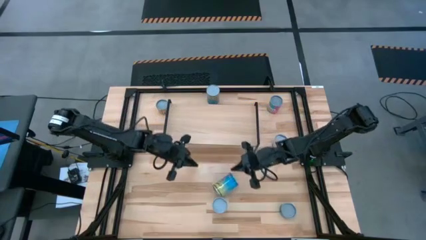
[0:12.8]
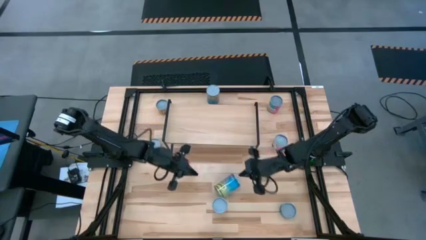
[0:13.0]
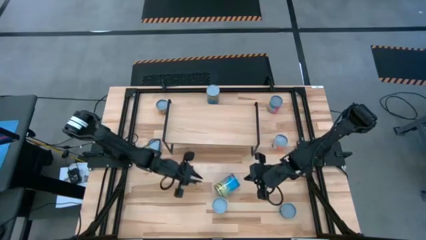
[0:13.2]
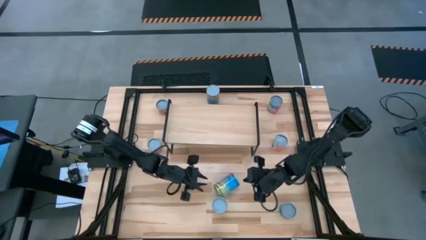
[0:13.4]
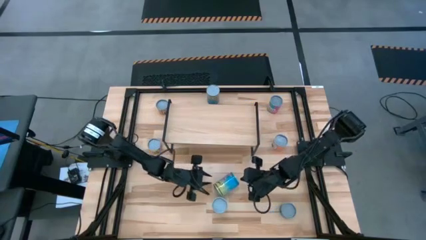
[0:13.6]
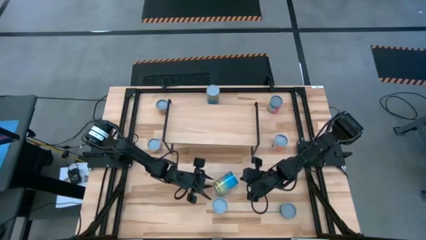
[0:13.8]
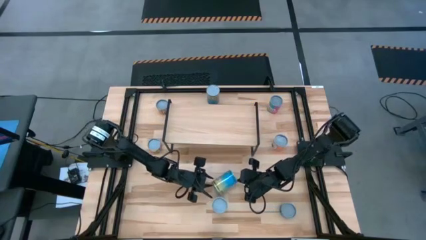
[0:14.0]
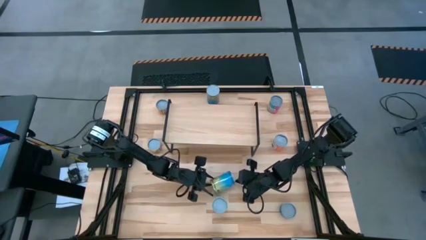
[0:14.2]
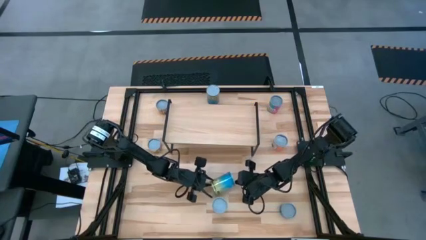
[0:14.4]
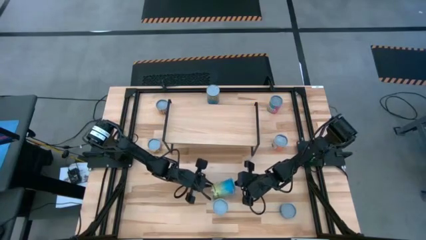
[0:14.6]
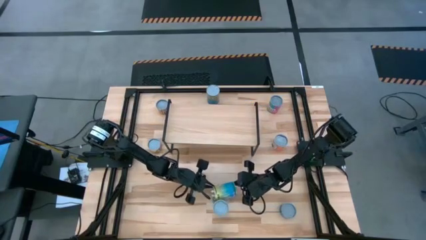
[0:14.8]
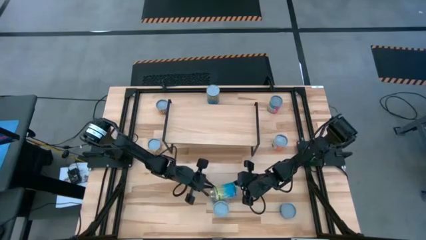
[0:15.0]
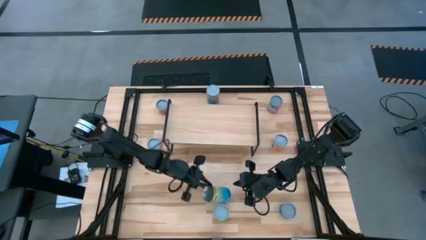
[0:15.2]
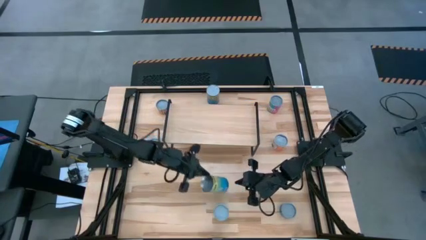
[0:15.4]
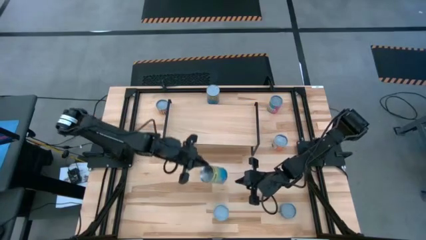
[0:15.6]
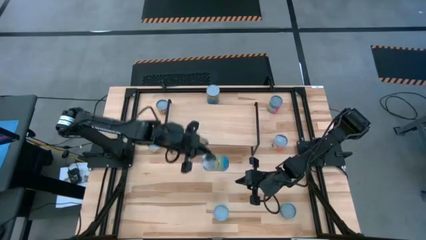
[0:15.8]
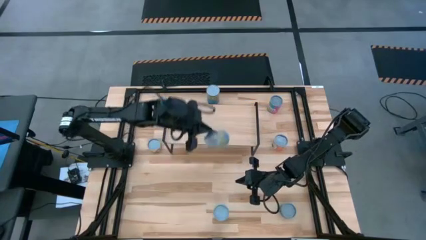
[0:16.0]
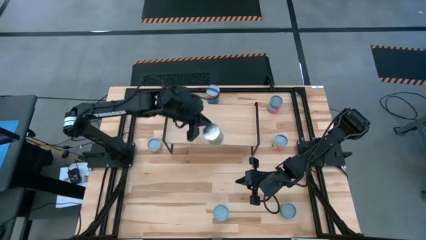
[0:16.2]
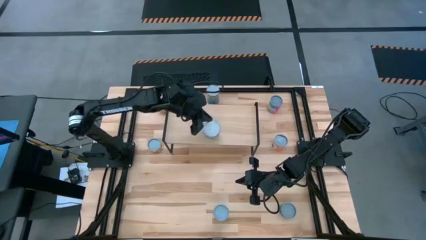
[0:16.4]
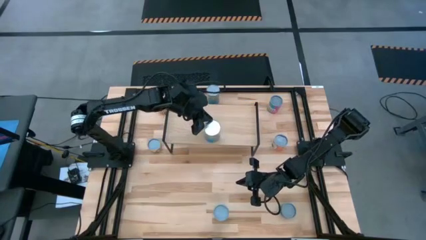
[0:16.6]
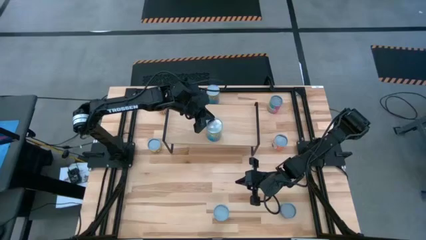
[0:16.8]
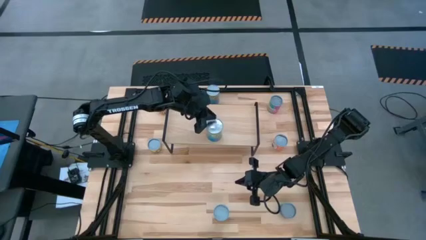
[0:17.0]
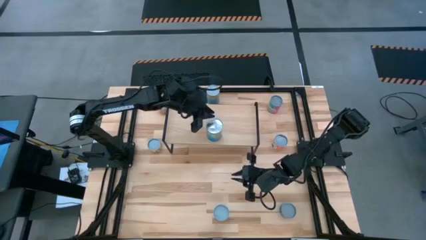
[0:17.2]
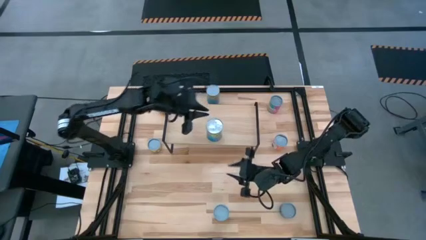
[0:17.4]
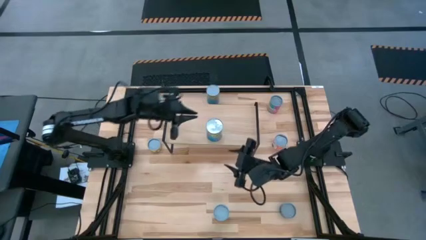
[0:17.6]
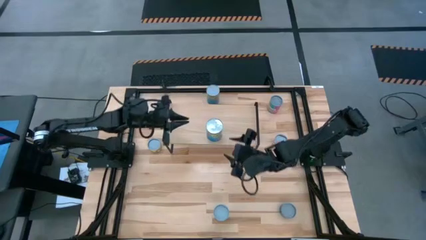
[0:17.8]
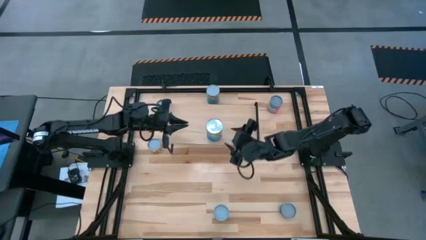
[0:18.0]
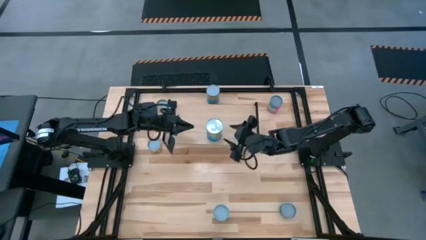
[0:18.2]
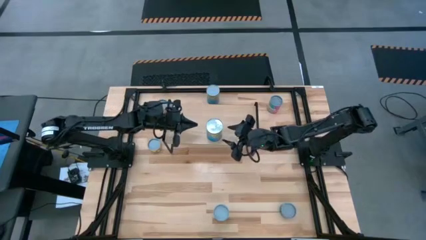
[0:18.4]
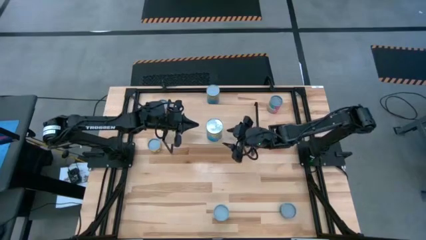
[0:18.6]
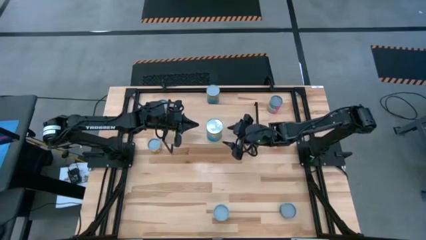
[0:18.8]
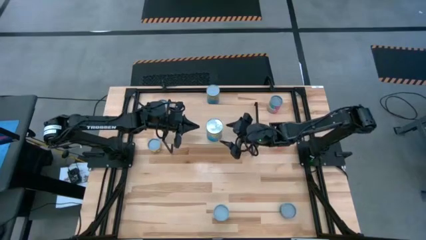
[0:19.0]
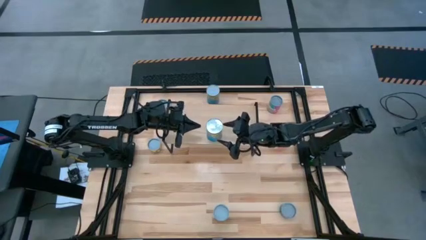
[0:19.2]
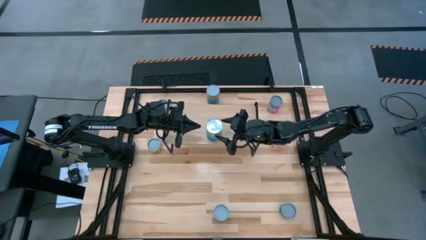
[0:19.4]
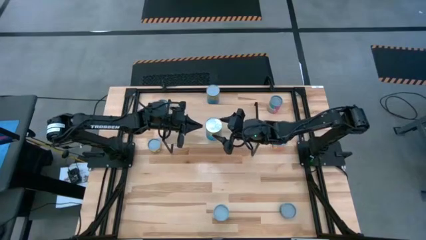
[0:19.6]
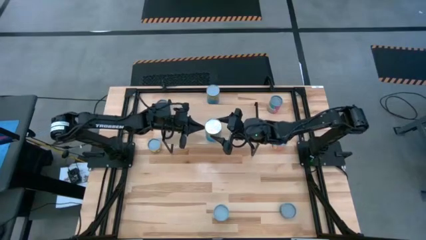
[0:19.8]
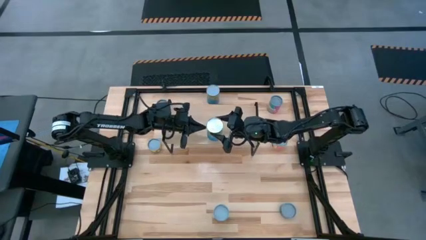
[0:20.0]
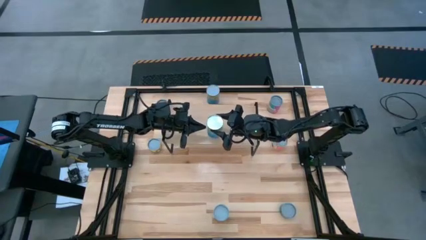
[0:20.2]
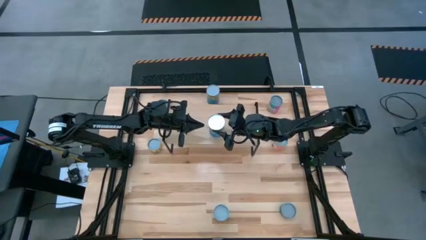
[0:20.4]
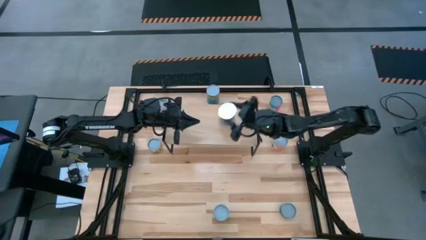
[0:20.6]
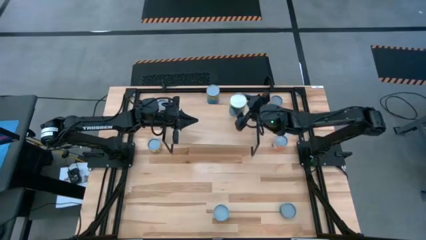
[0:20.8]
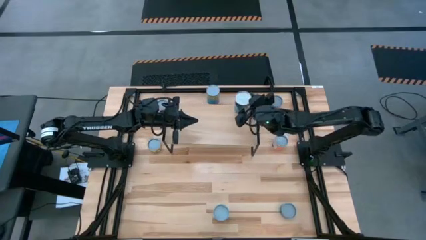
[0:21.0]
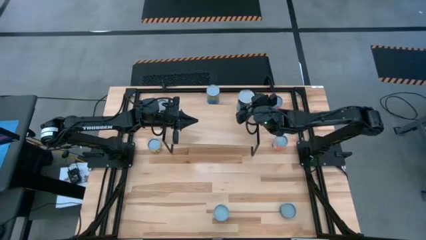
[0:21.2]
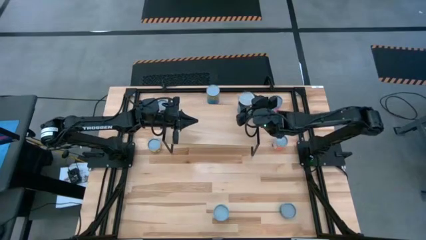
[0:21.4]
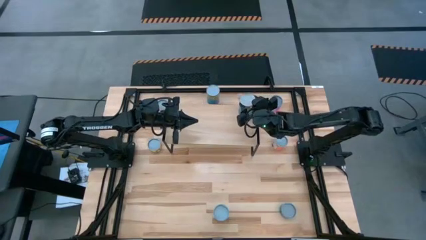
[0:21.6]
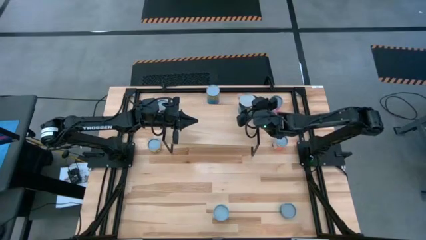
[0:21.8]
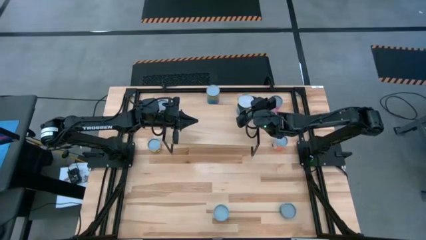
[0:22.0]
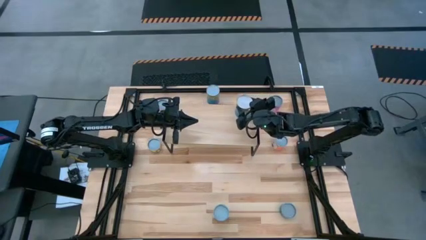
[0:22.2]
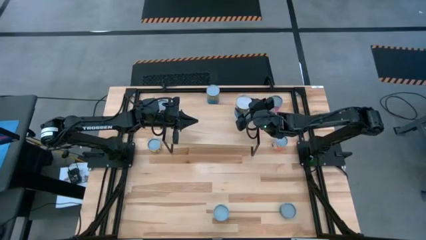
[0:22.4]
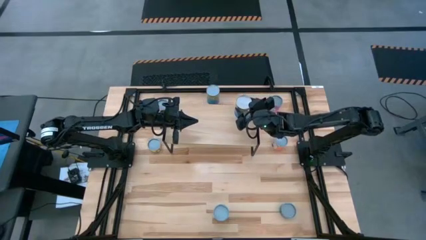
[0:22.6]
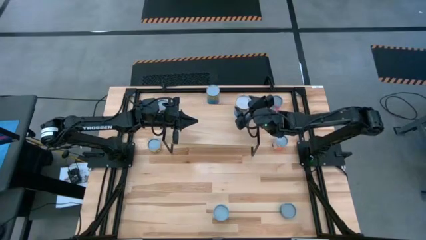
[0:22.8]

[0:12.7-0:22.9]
Task: Pick and place cans onto a shelf
Put the bottom blue can on the shelf

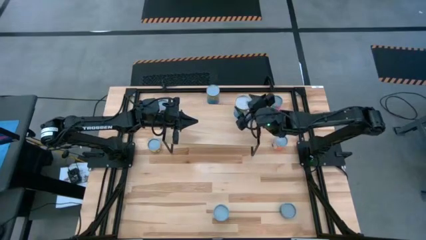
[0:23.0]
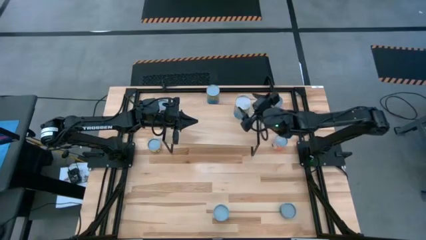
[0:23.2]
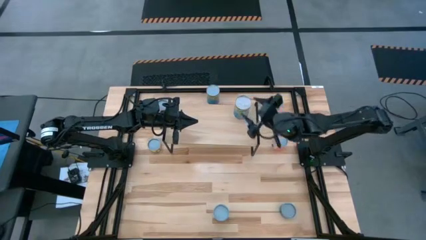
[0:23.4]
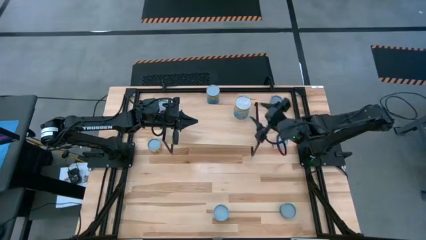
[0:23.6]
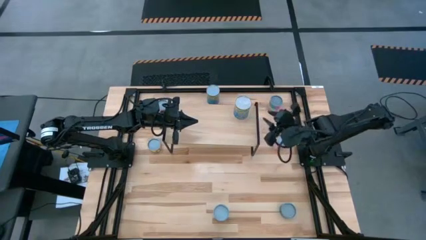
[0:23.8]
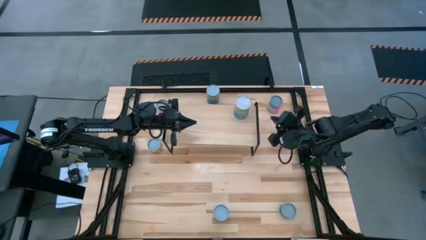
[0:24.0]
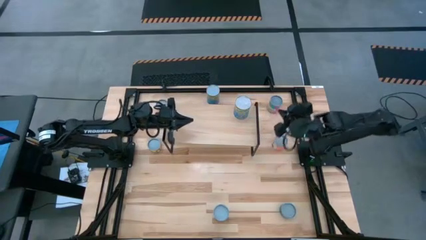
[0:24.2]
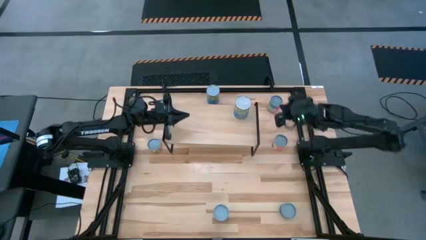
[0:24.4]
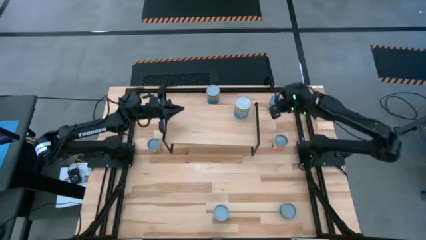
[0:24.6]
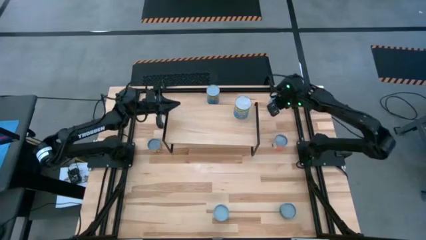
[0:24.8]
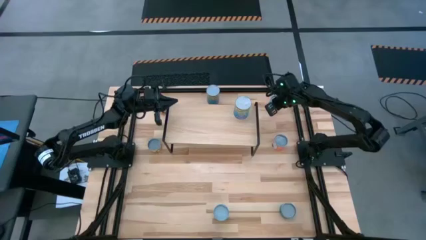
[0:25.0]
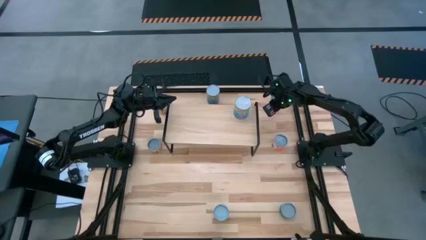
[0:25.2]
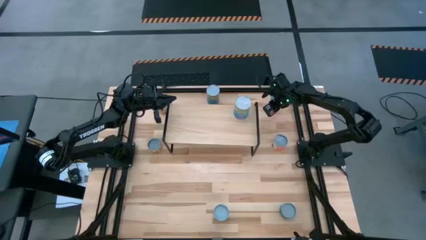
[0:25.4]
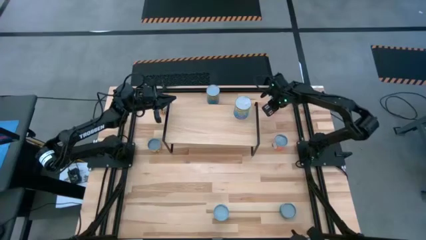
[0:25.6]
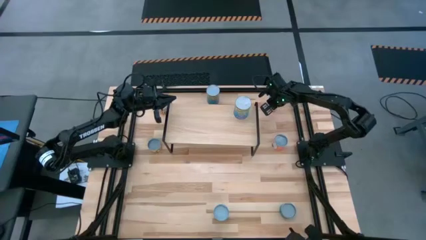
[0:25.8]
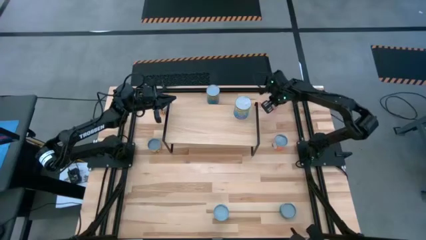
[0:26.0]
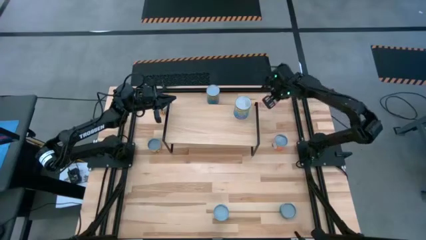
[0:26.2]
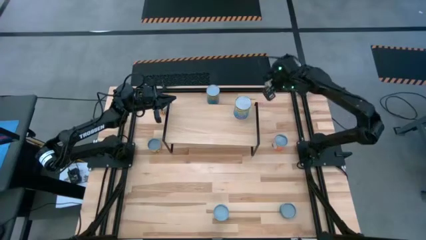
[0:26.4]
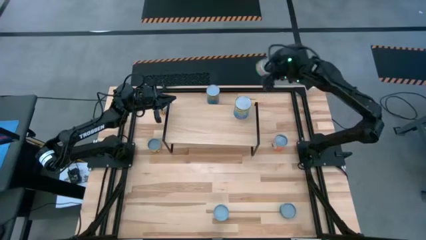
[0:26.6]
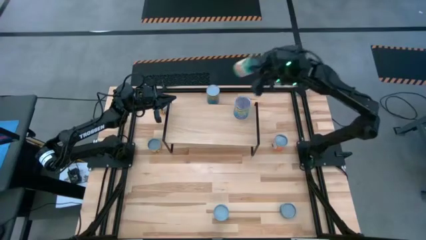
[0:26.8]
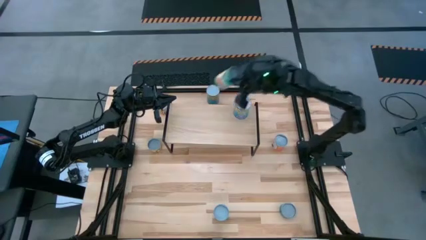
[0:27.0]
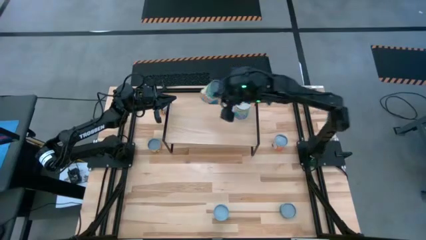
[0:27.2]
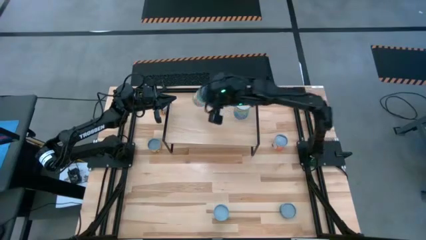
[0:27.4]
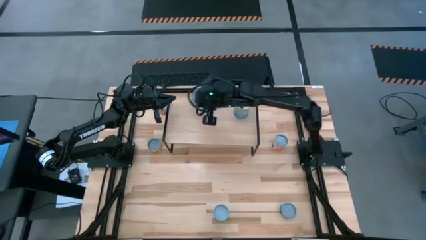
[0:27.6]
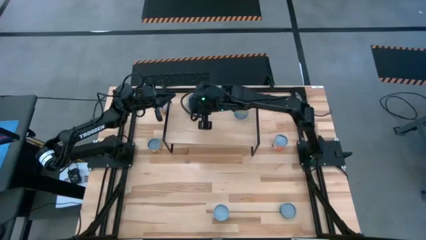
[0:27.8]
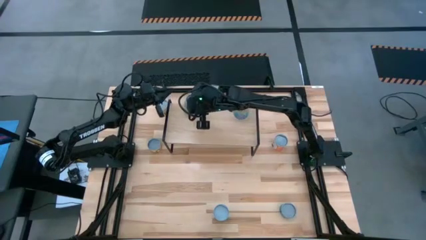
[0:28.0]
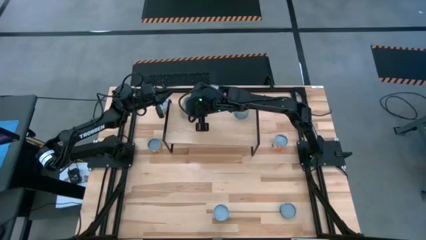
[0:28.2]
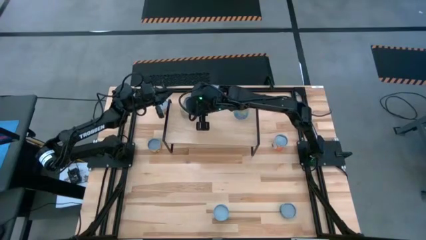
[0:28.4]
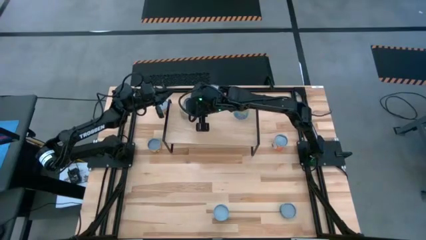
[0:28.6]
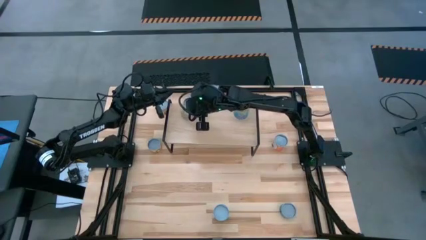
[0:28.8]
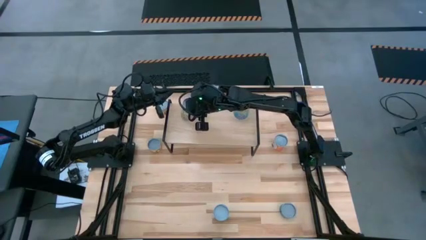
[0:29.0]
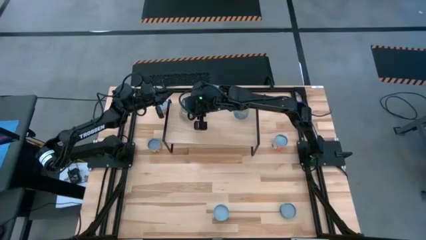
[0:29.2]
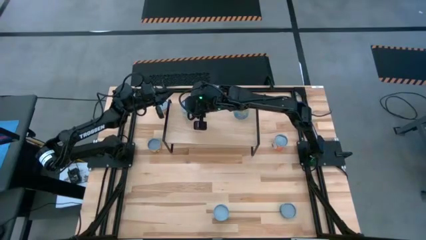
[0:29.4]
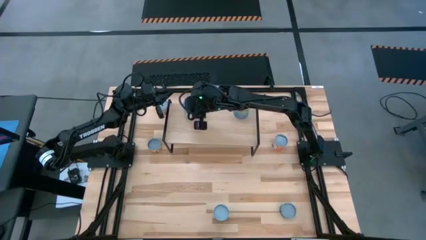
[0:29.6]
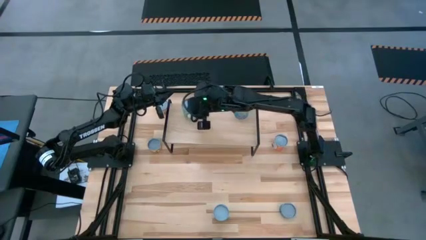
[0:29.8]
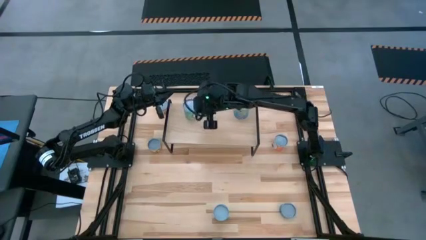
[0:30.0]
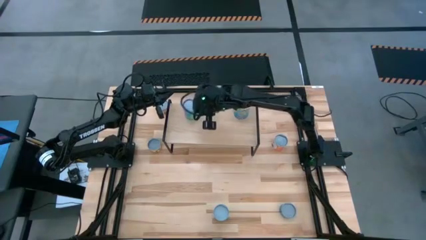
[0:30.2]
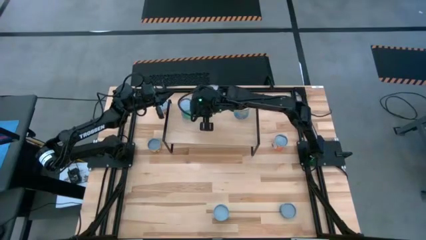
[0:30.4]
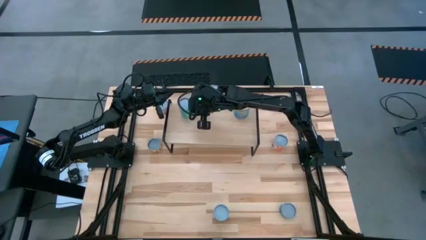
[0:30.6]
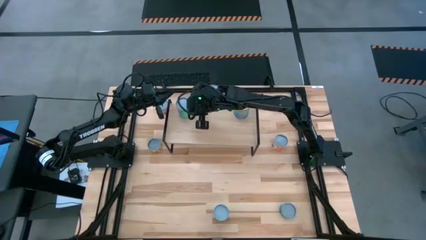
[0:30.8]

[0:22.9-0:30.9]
Put the top green can on the shelf
